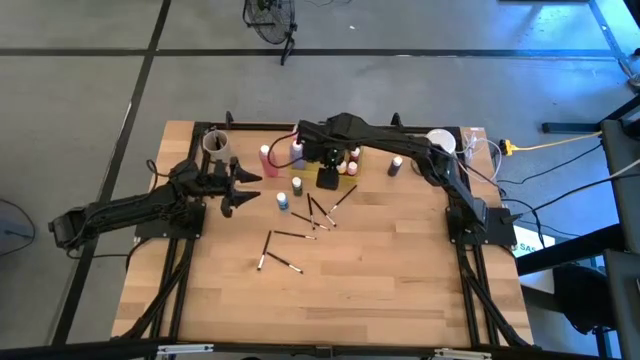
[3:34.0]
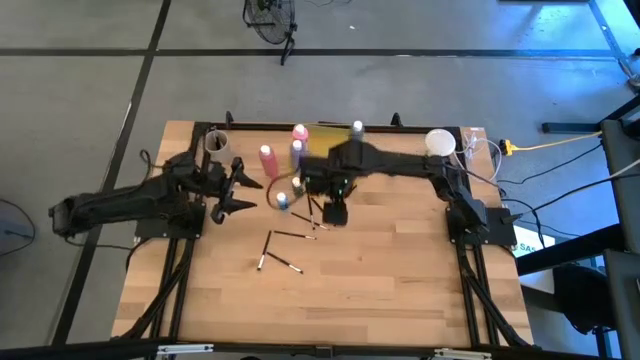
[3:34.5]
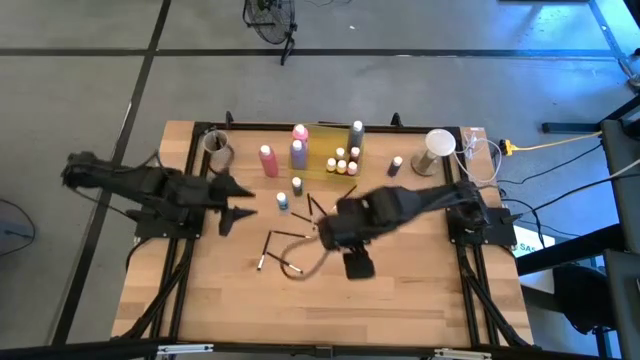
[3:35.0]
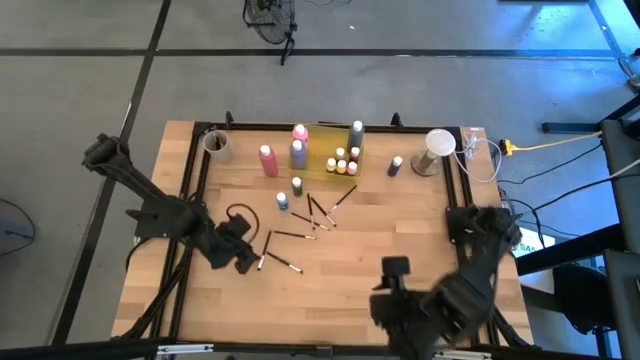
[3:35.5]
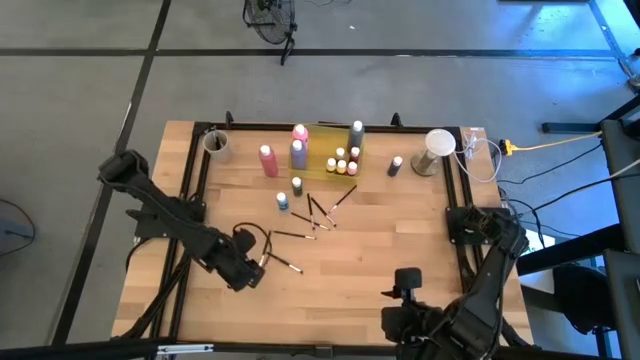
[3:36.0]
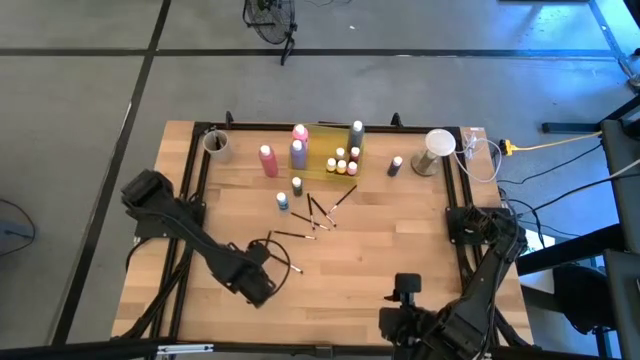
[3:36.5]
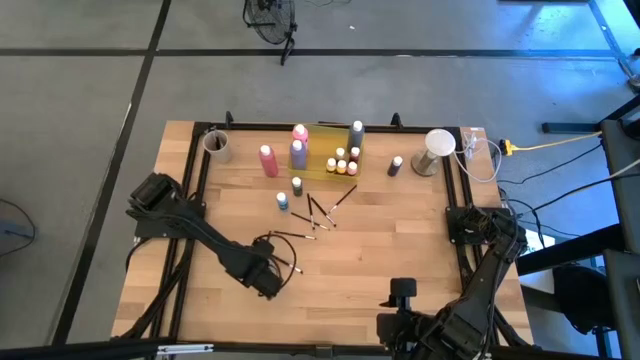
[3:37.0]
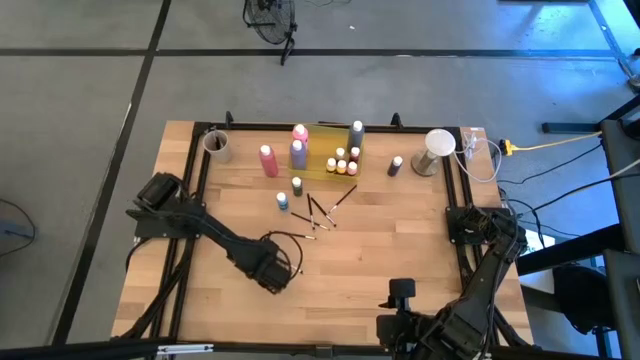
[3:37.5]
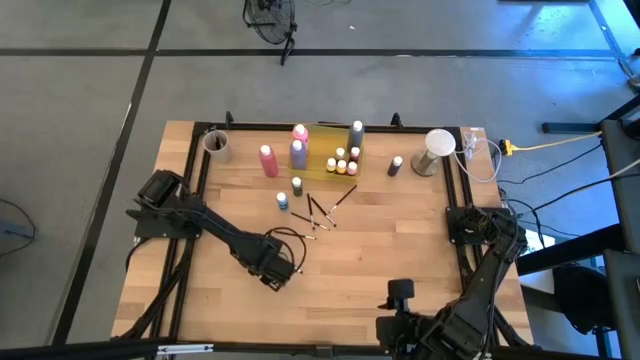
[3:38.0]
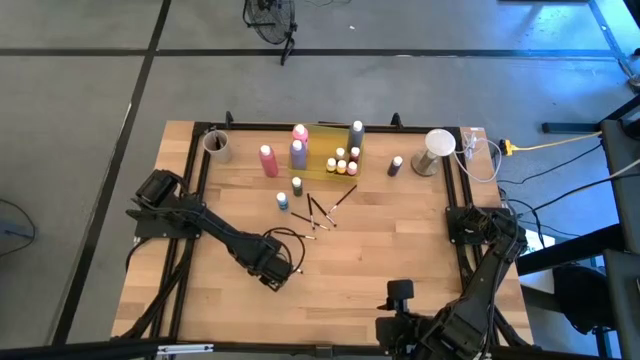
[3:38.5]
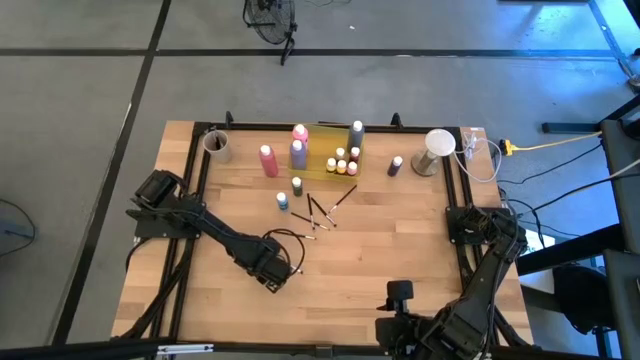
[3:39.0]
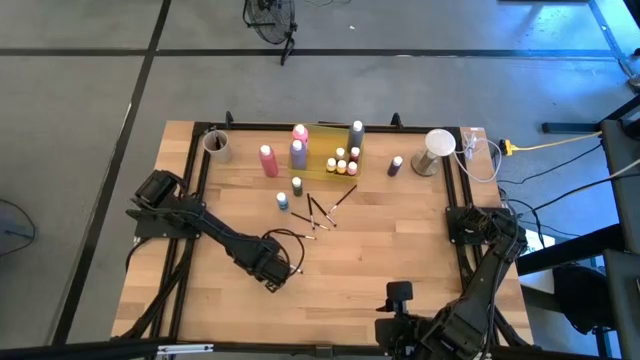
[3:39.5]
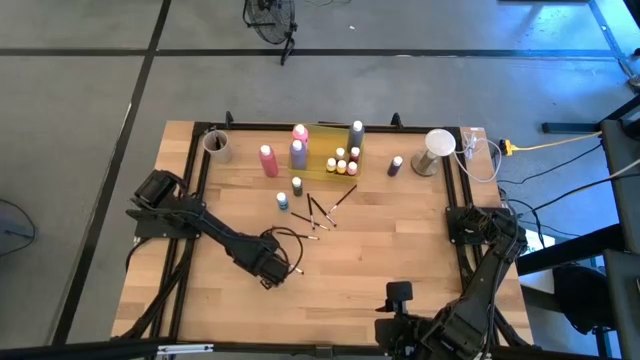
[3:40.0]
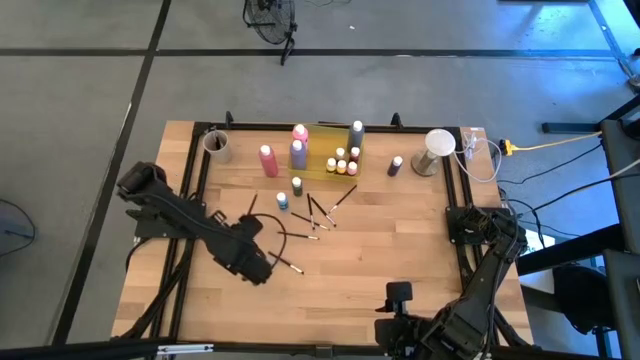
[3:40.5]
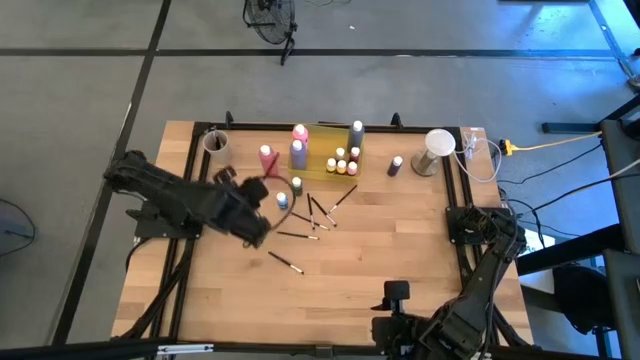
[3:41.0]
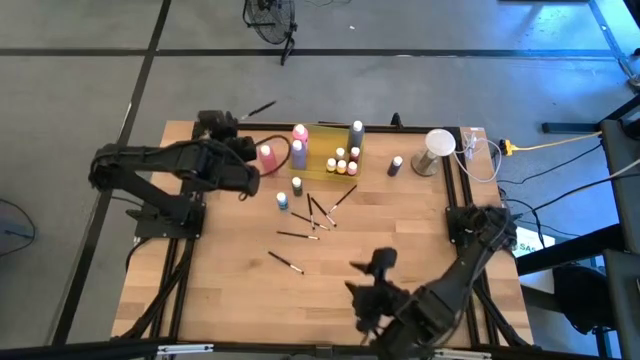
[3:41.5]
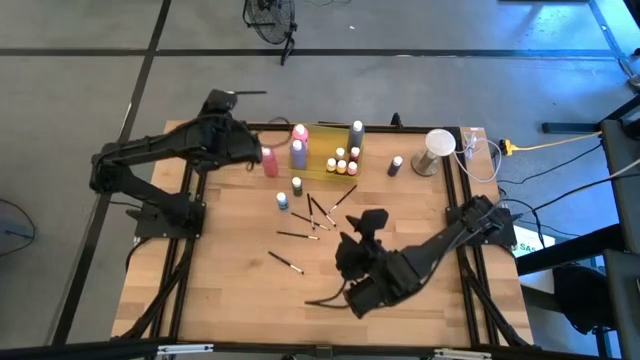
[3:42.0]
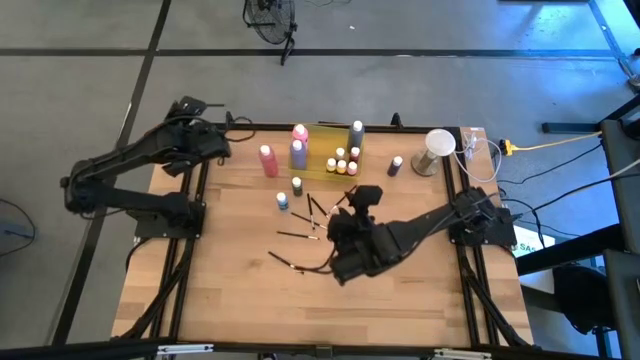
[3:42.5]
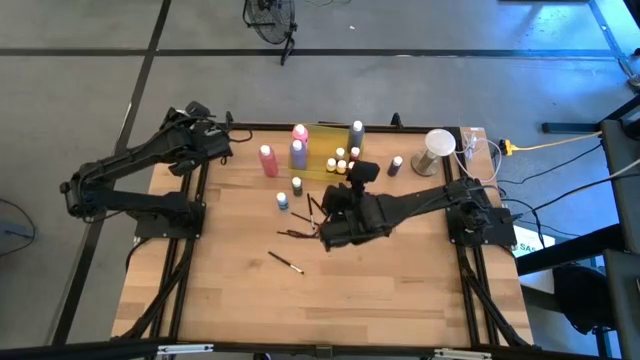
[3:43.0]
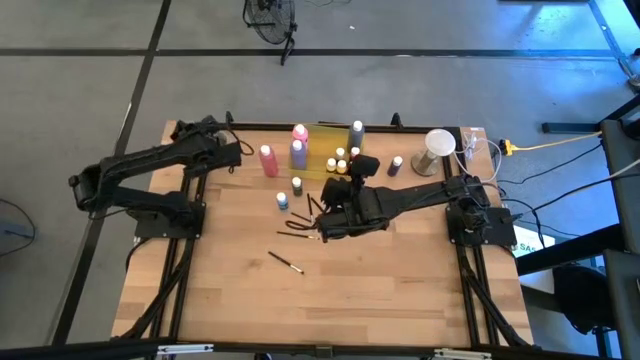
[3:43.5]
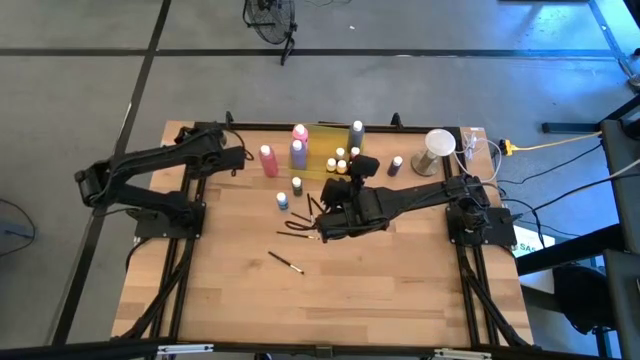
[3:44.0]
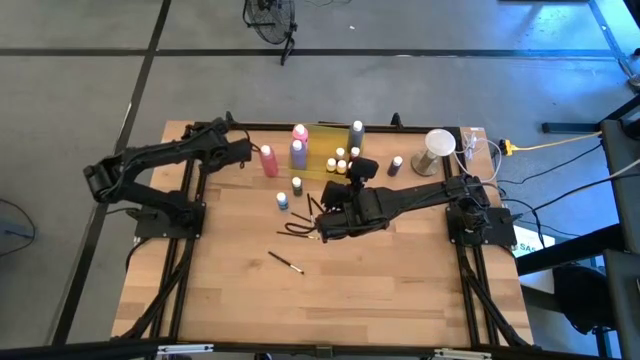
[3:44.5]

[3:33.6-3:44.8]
Task: Pick & Place Paint Supplies
Put the silver paintbrush into the white cup

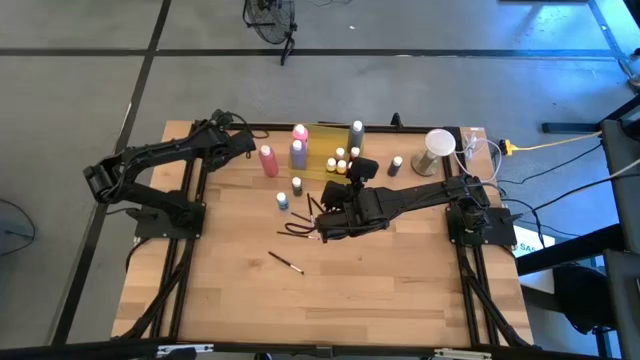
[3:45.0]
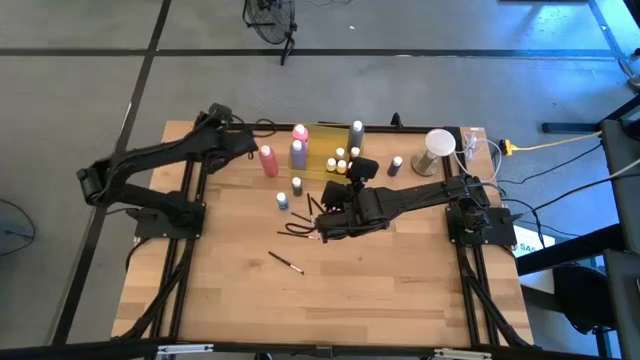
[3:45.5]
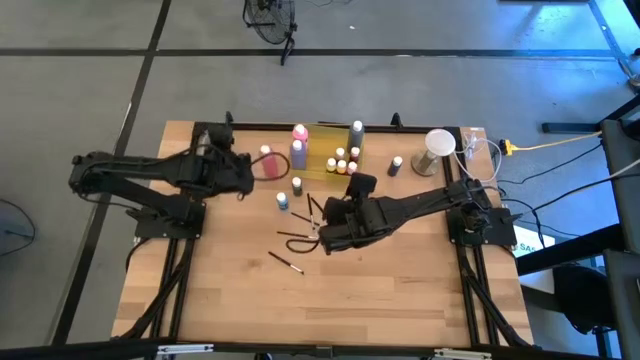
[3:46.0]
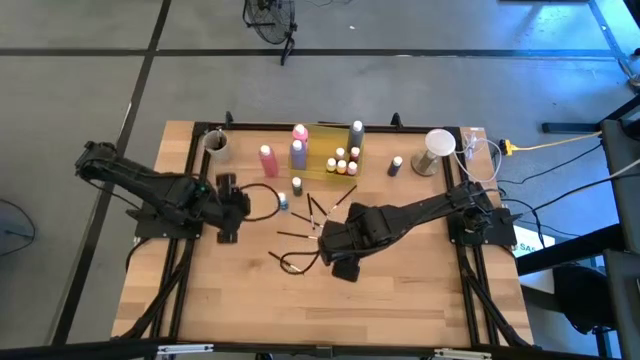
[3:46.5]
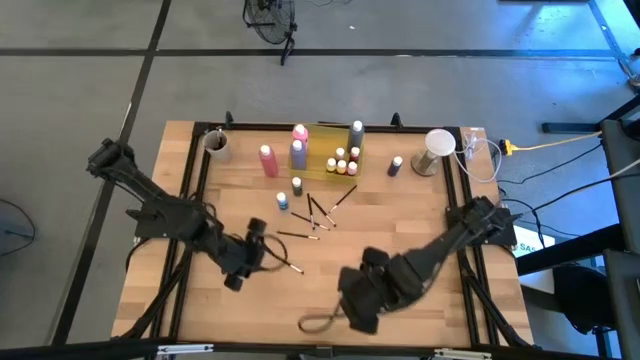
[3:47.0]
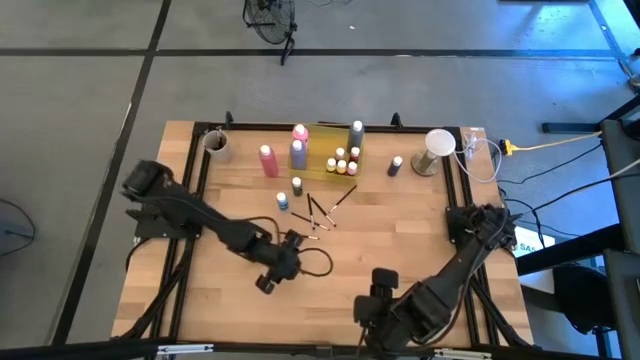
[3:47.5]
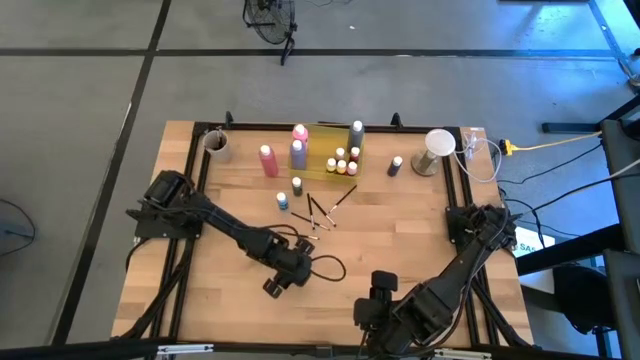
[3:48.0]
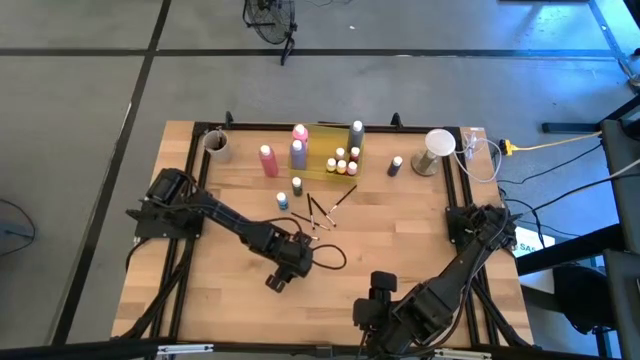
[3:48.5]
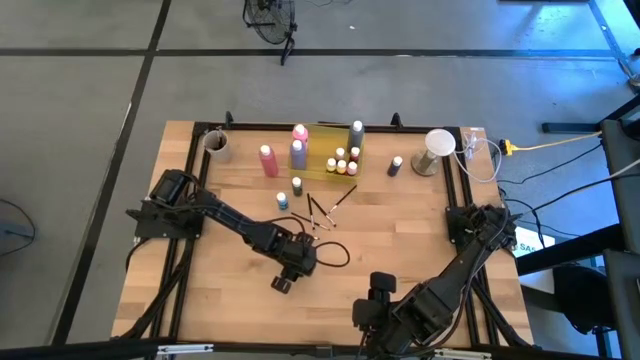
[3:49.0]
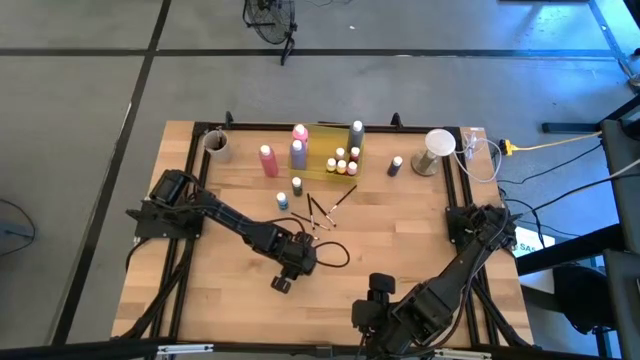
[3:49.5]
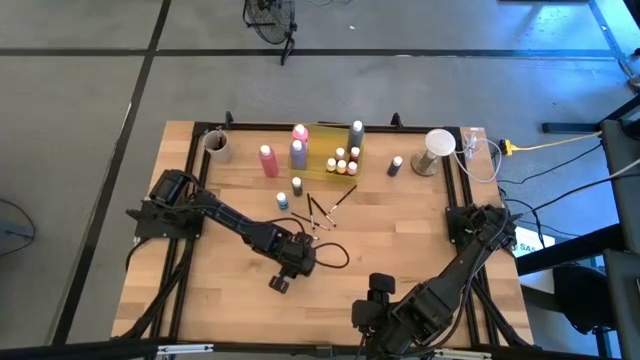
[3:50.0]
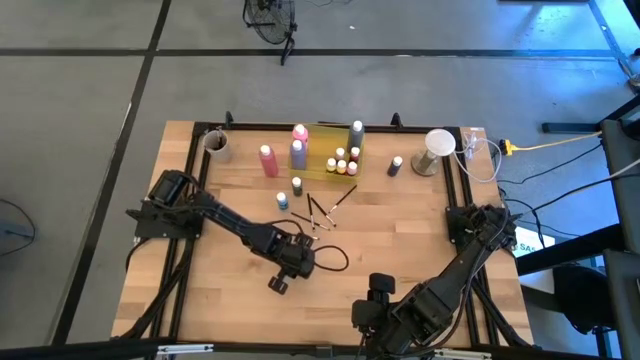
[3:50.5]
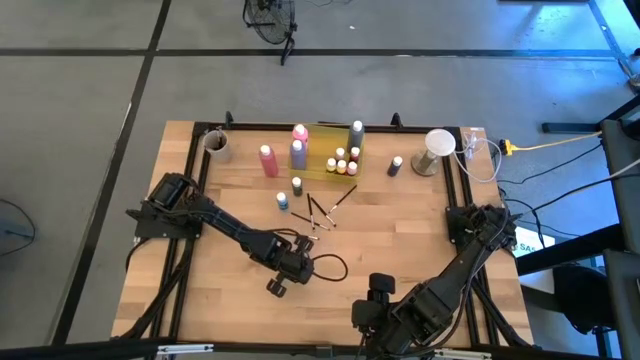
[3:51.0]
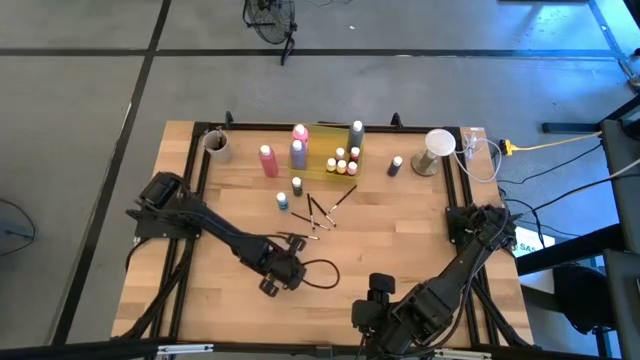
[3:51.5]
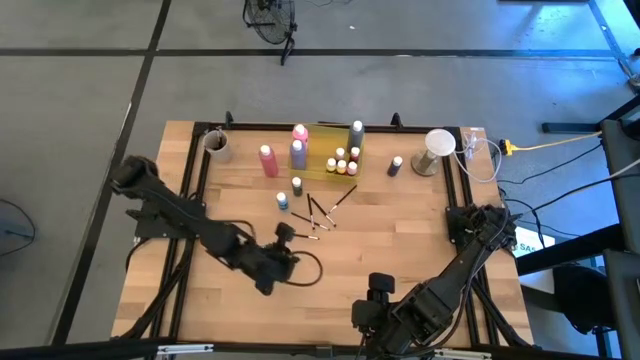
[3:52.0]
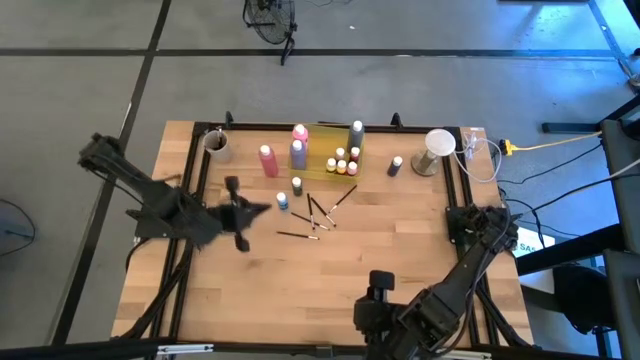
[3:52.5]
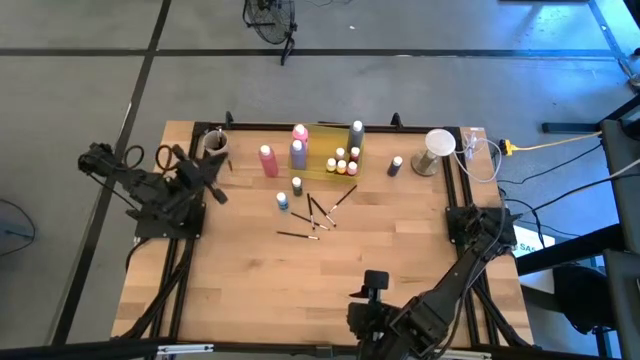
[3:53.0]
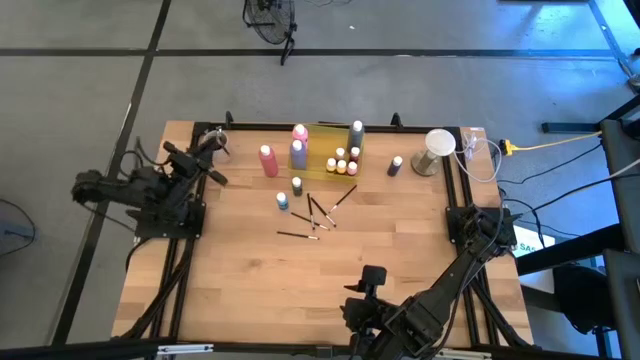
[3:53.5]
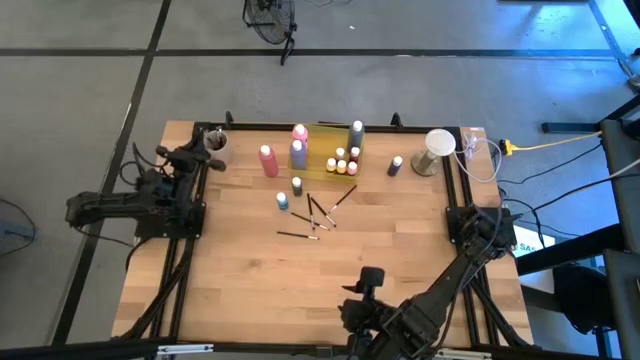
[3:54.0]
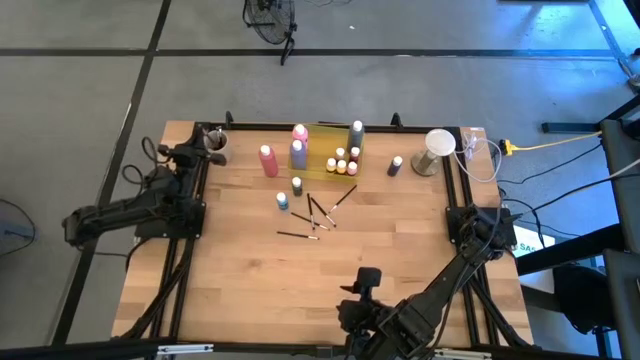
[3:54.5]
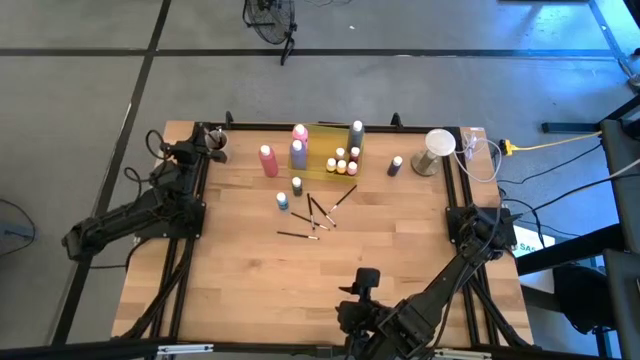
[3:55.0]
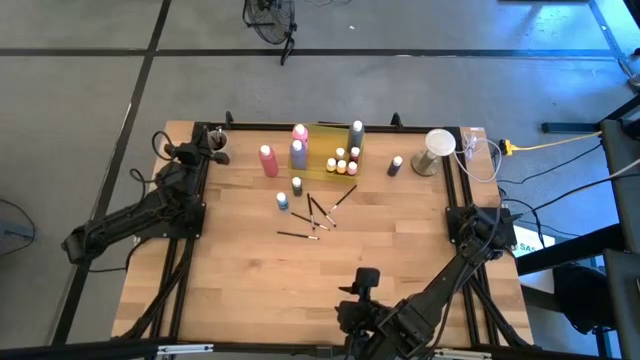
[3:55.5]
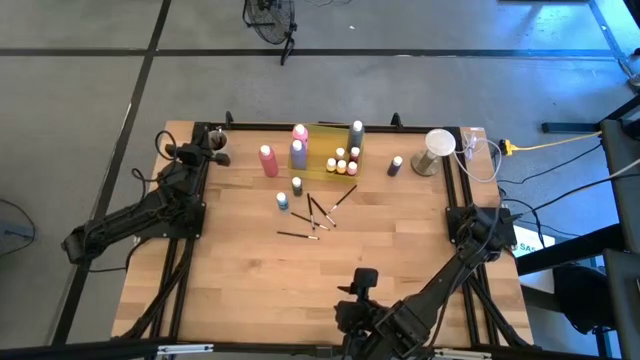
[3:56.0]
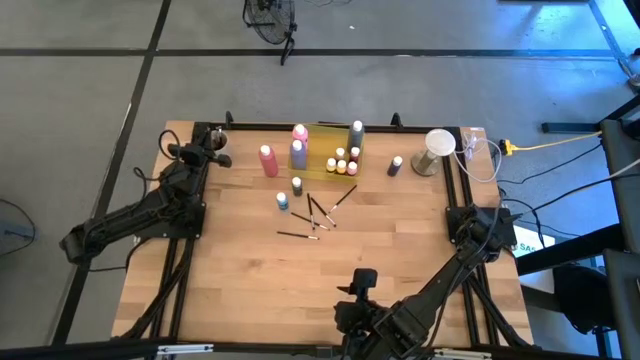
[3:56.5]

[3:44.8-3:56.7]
Put the silver paintbrush into the white cup
